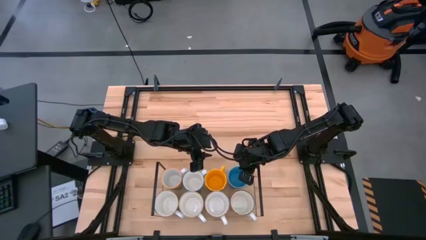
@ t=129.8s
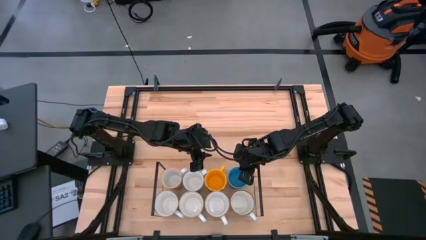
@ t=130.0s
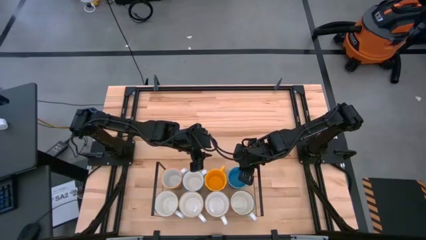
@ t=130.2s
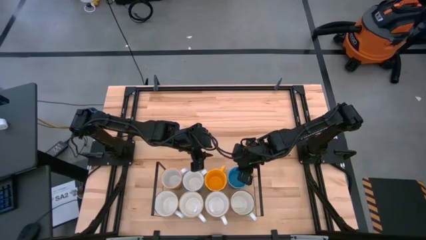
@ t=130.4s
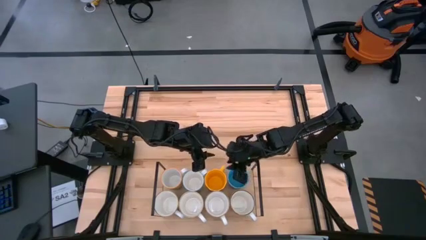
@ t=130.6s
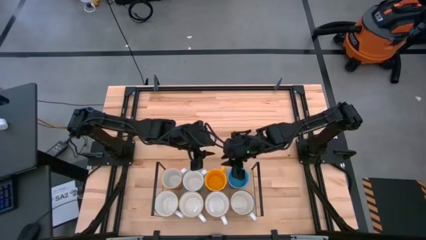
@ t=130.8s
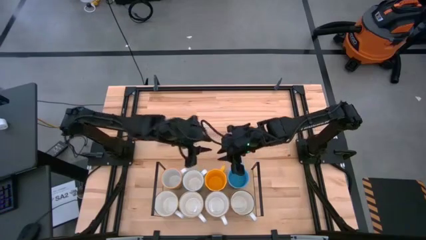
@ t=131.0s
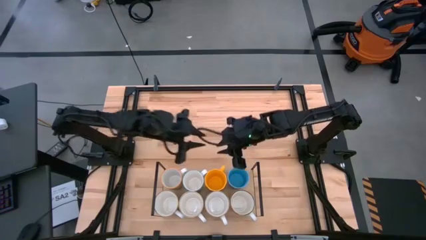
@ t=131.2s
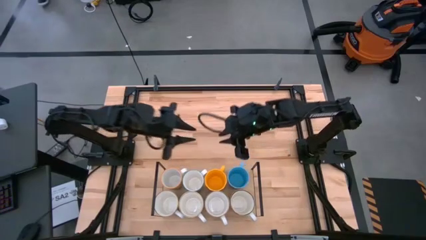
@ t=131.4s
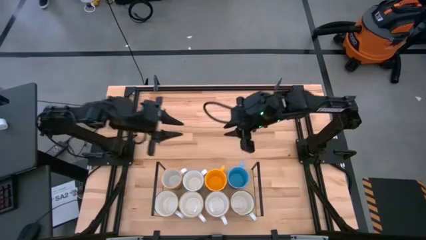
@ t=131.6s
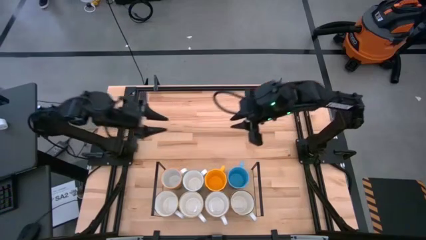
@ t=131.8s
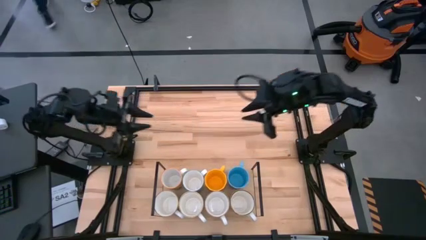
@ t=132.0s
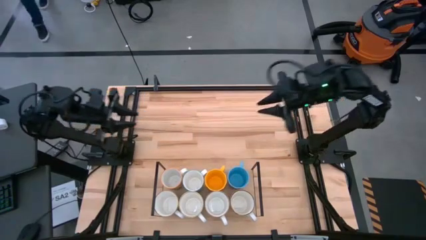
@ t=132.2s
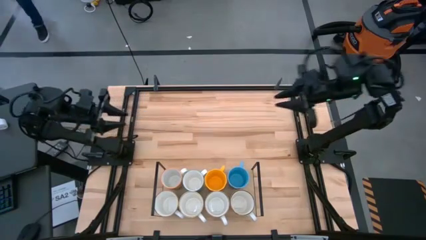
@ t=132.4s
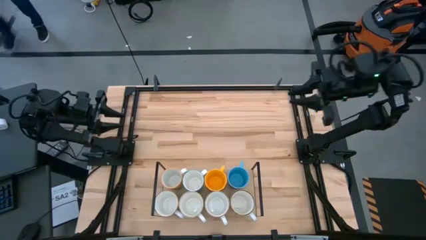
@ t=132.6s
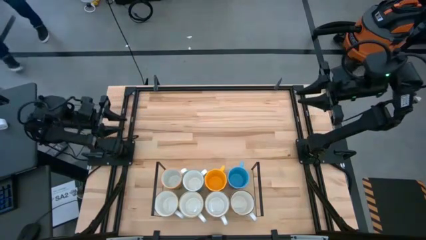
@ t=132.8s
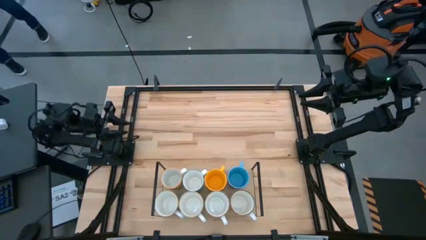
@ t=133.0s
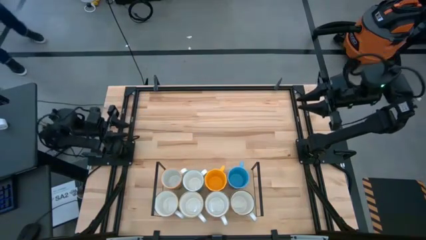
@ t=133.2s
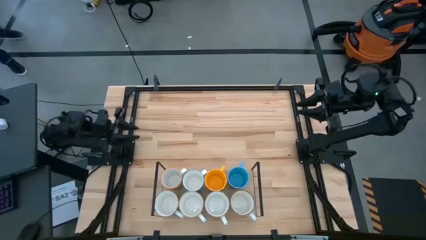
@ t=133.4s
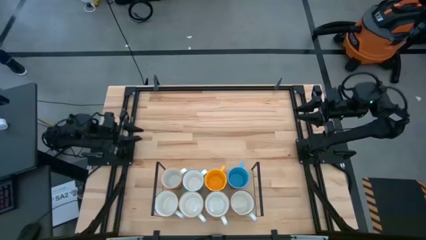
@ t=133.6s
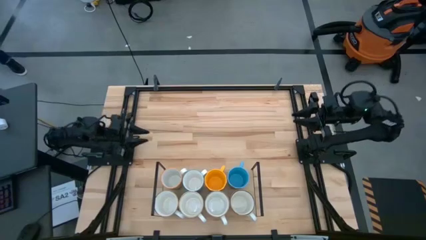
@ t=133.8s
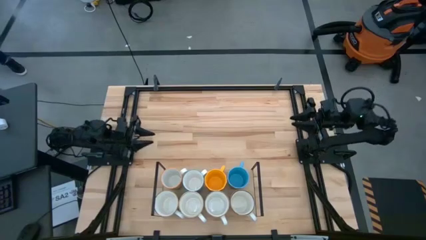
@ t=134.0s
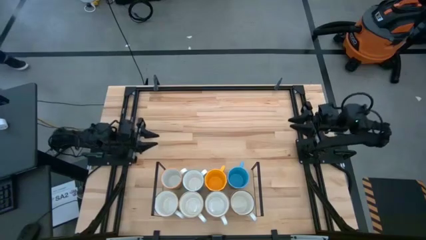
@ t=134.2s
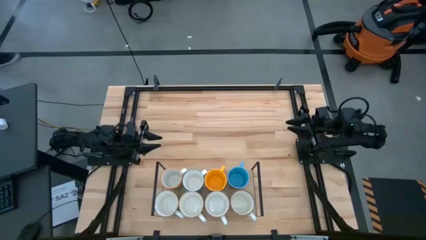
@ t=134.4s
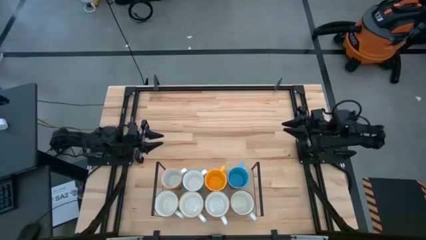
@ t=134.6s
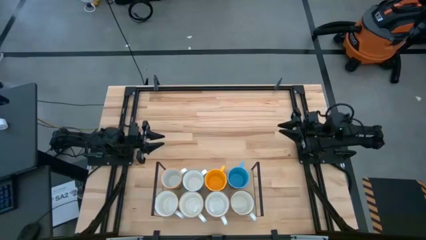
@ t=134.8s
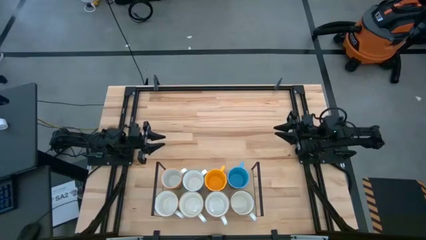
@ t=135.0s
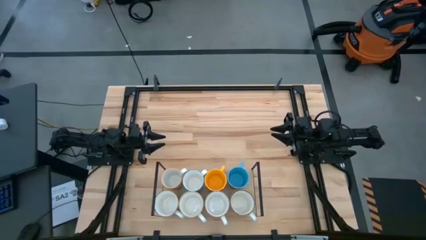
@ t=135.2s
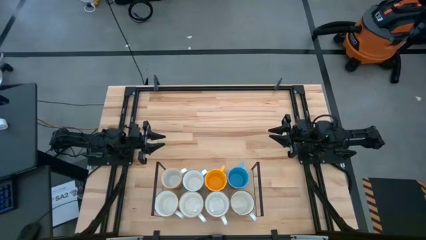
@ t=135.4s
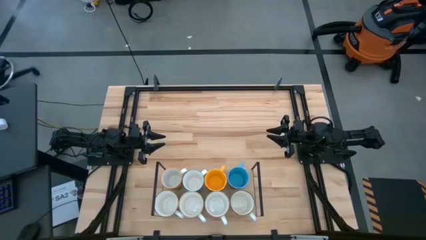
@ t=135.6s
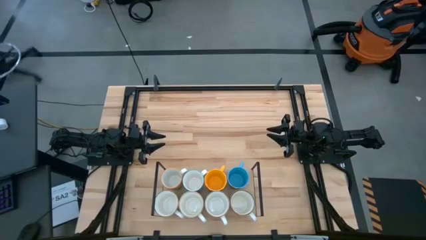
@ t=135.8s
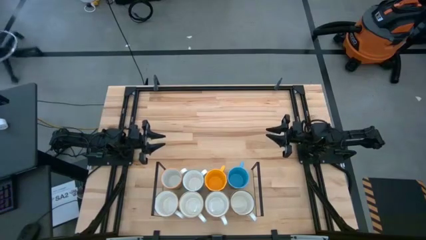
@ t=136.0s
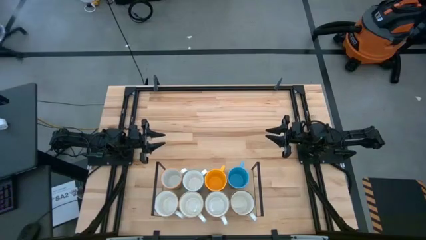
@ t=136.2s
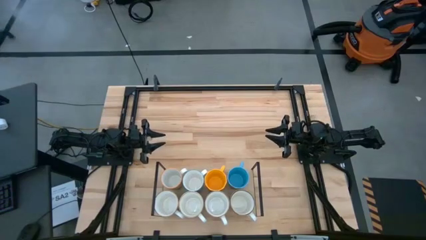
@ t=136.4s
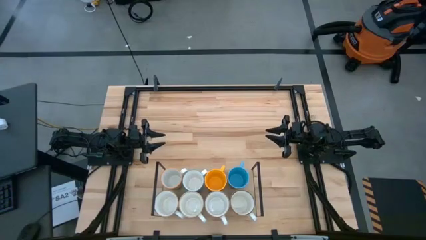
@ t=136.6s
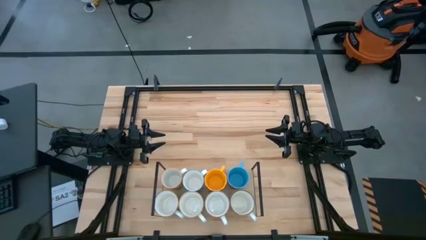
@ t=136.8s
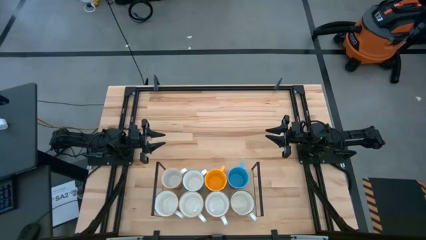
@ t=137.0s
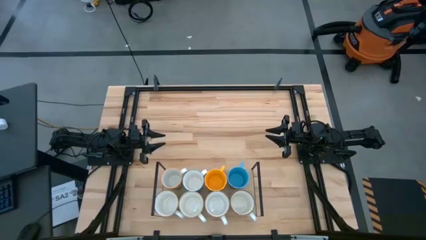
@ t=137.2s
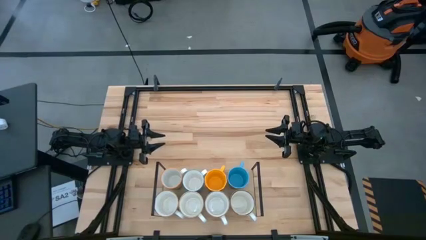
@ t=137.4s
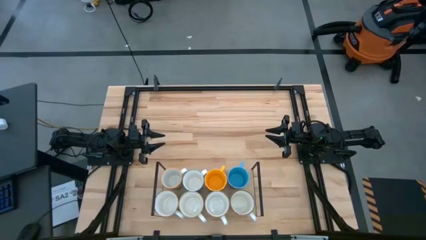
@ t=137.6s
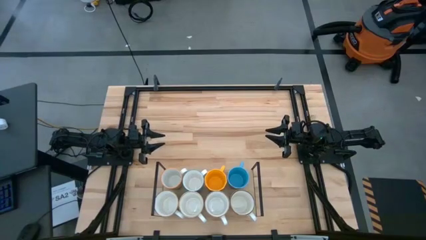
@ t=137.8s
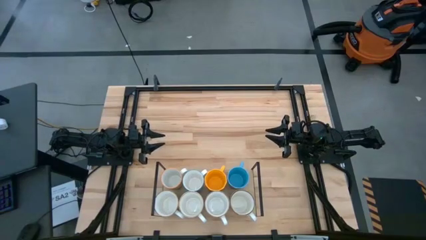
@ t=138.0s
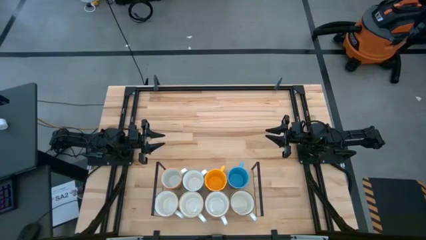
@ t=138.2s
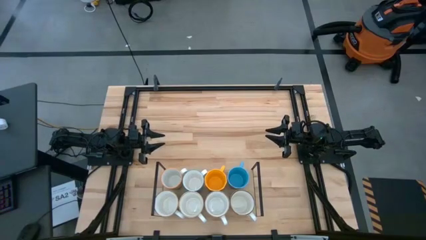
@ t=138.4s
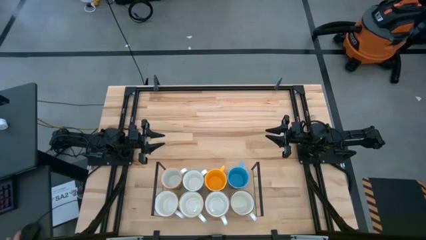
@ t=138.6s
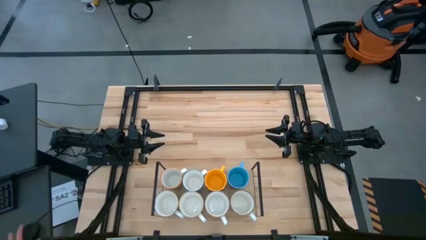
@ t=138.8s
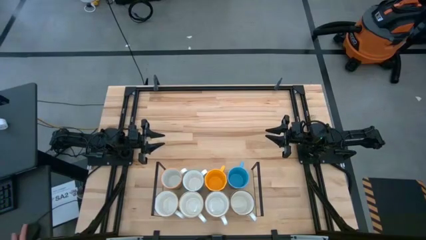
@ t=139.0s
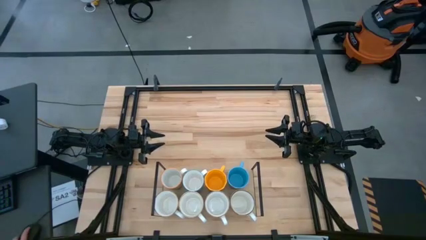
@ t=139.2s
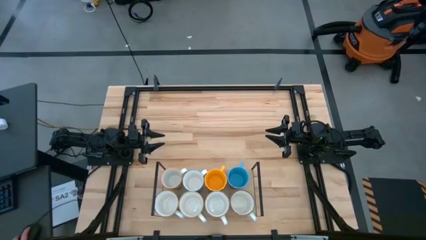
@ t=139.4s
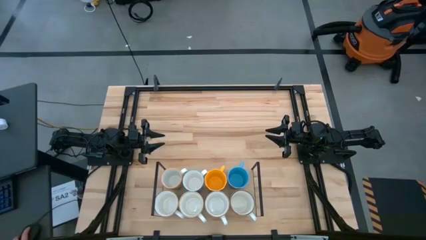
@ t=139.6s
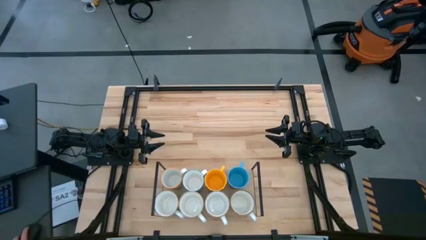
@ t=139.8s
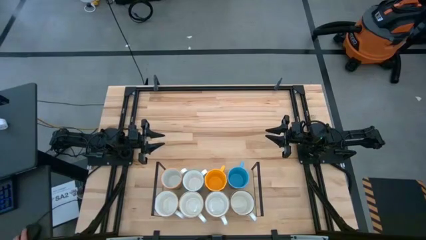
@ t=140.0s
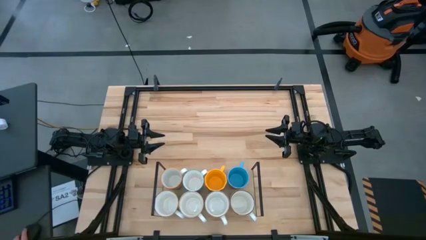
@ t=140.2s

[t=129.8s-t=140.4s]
Task: Place coffee mugs
Return to Home Position
